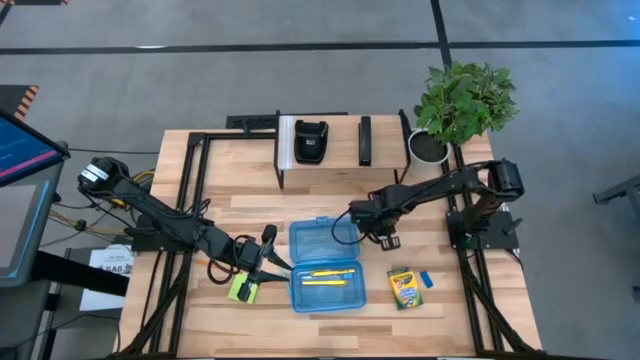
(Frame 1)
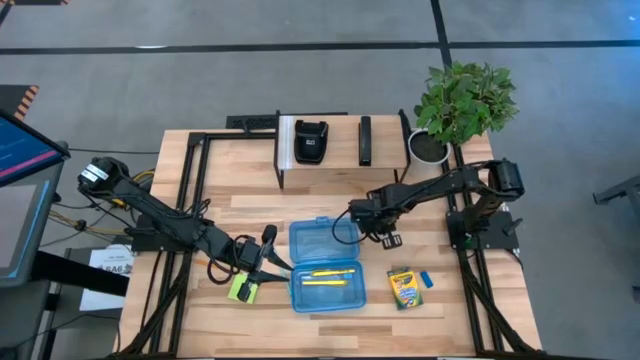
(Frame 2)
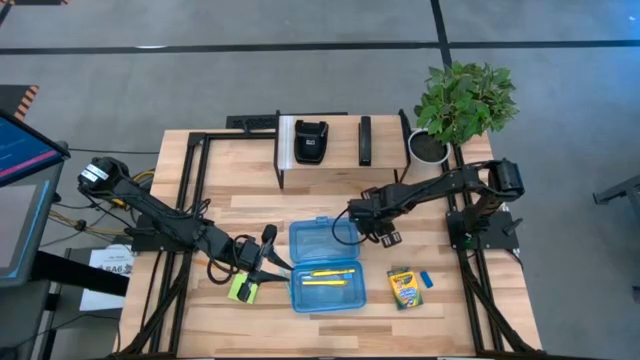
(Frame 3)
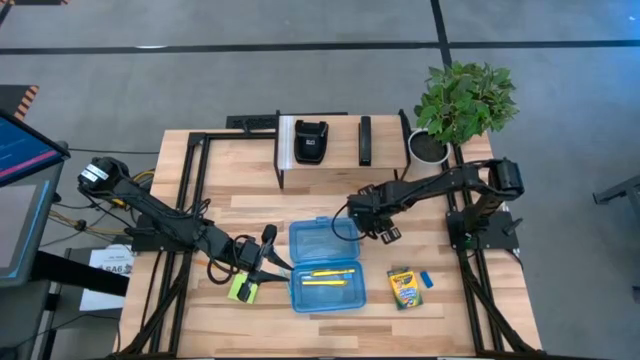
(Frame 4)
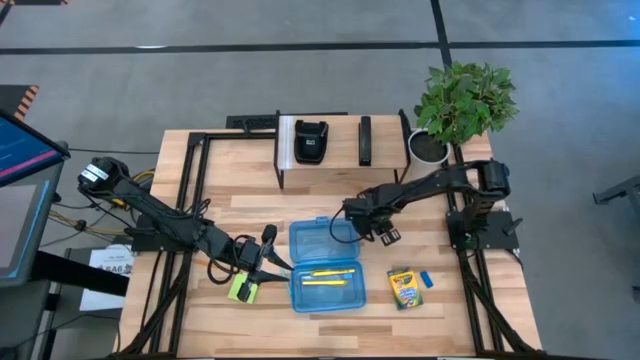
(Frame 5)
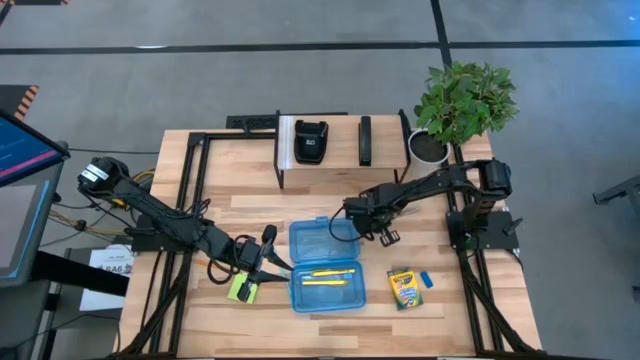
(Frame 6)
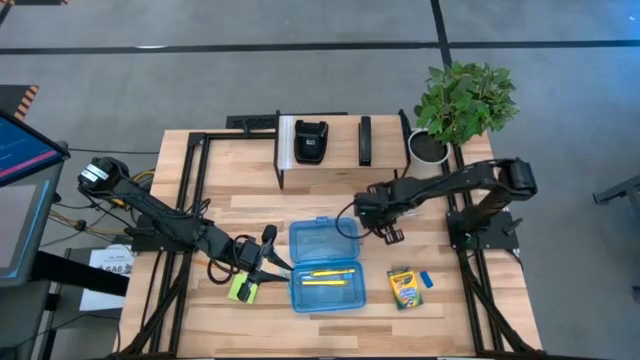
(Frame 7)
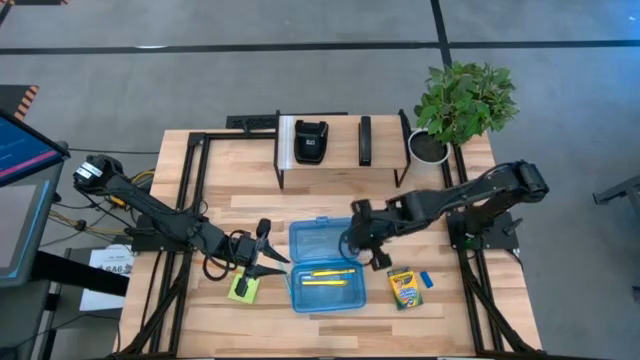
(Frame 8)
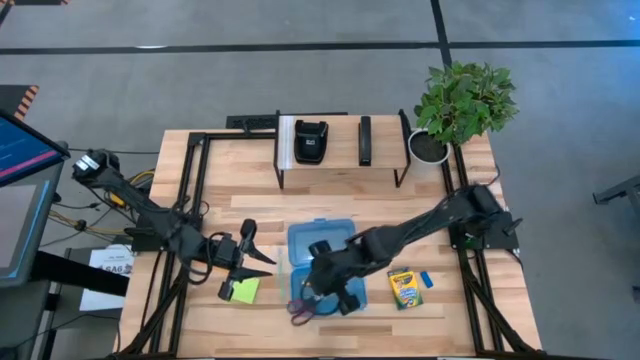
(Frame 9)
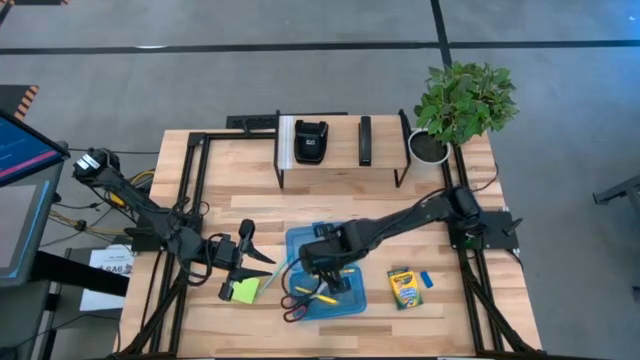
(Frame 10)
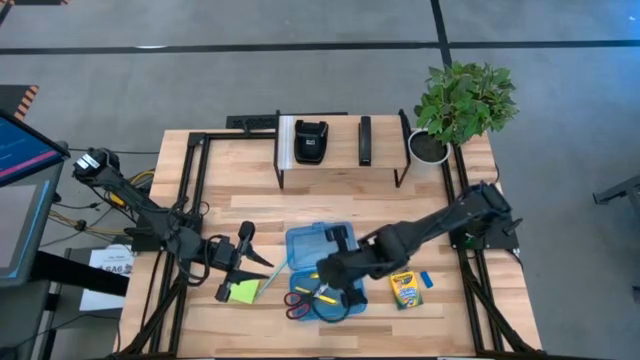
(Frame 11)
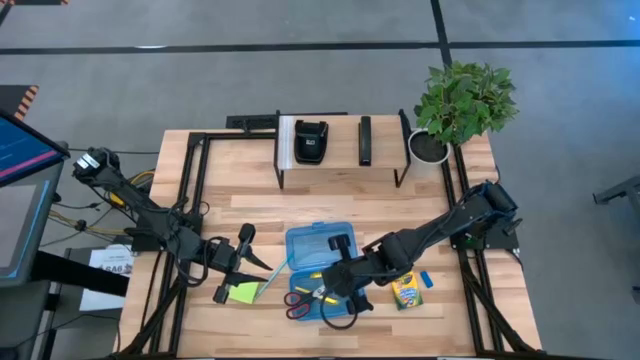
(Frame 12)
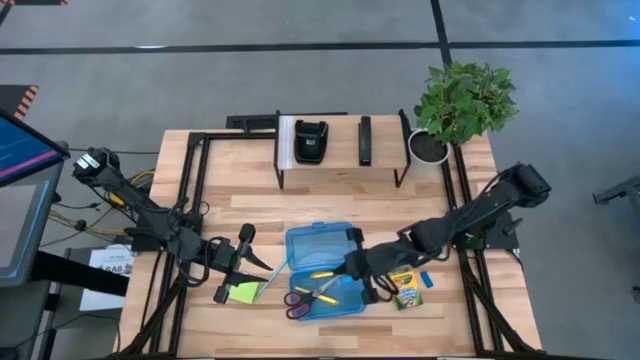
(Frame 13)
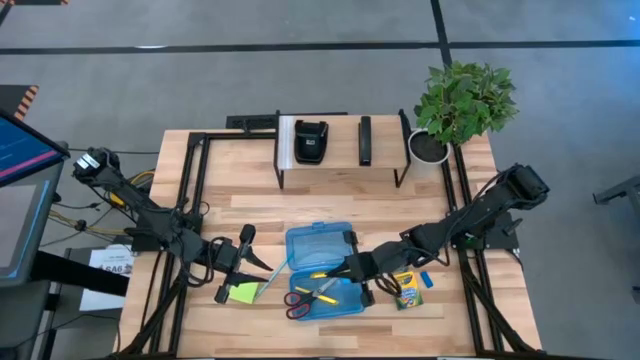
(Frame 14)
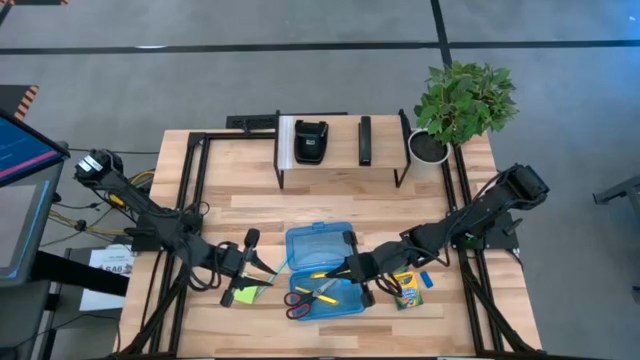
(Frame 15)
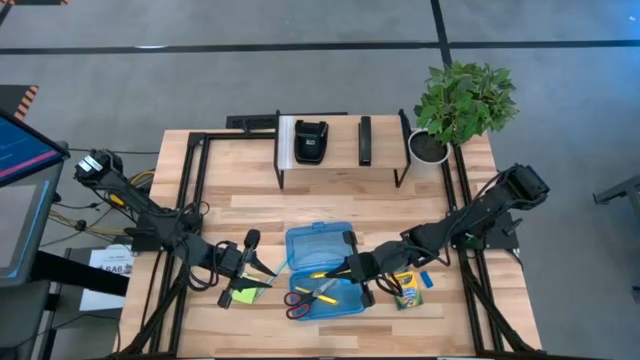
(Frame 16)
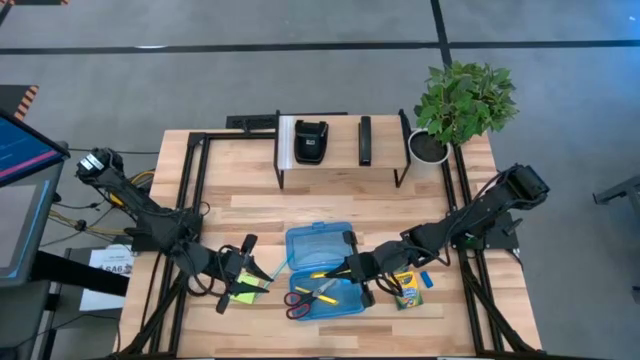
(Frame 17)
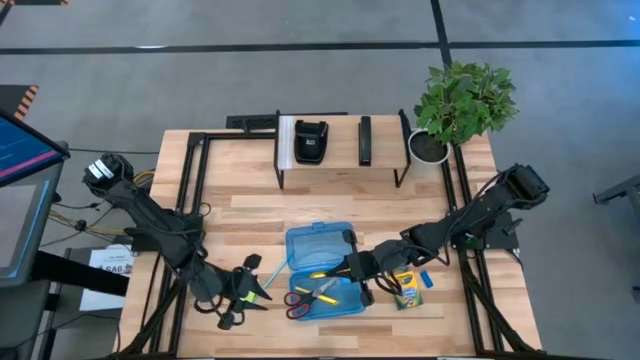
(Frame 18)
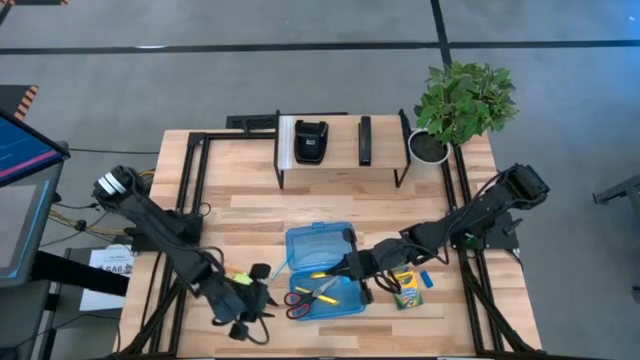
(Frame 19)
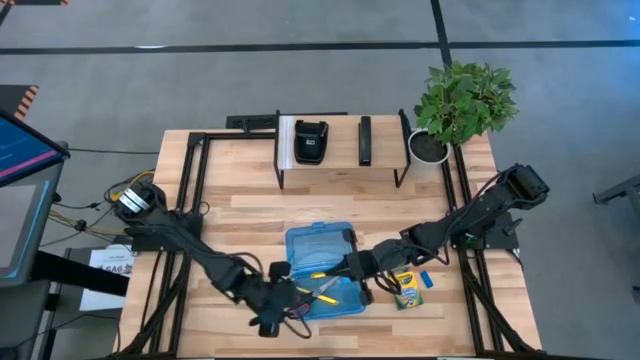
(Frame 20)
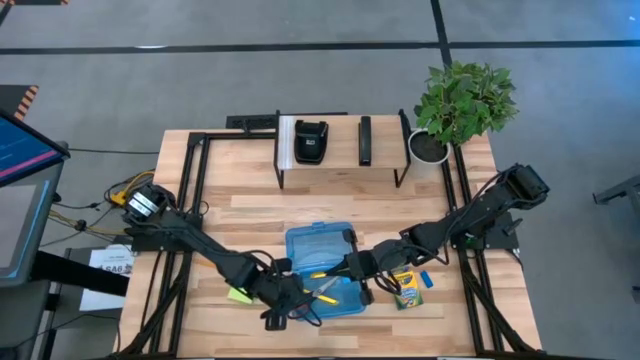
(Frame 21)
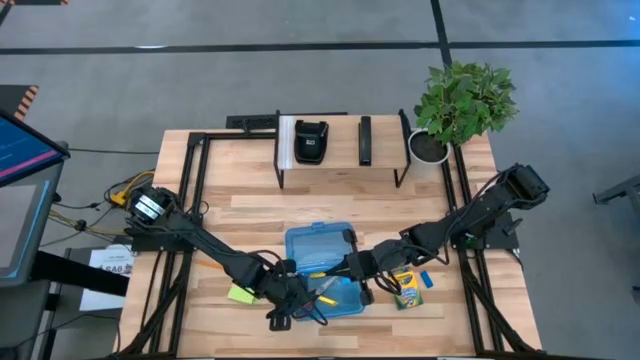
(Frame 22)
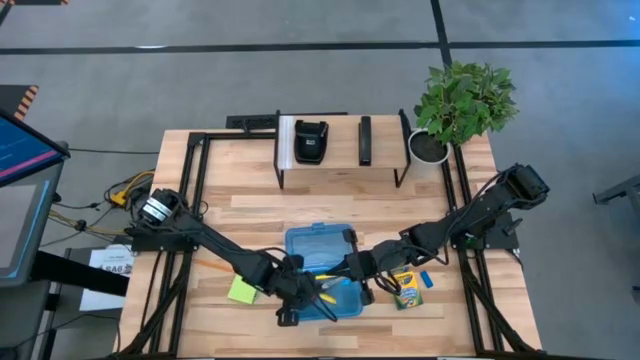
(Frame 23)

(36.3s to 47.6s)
Task: Pack school essentials
Put the black scissors into the blue supply box

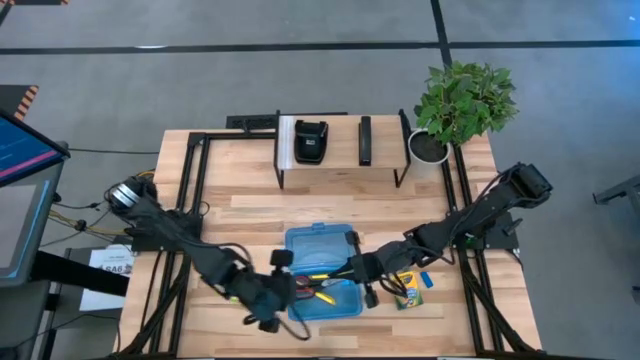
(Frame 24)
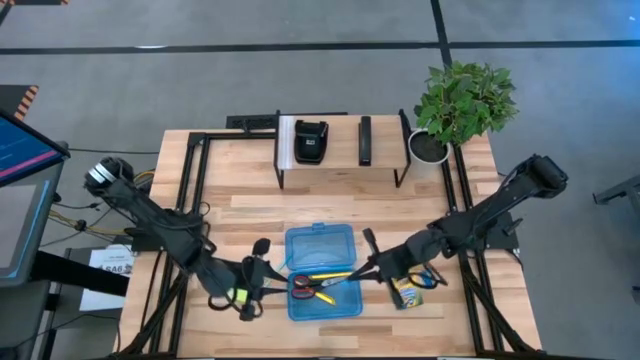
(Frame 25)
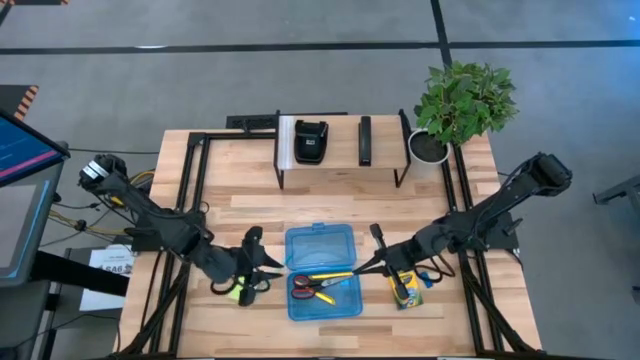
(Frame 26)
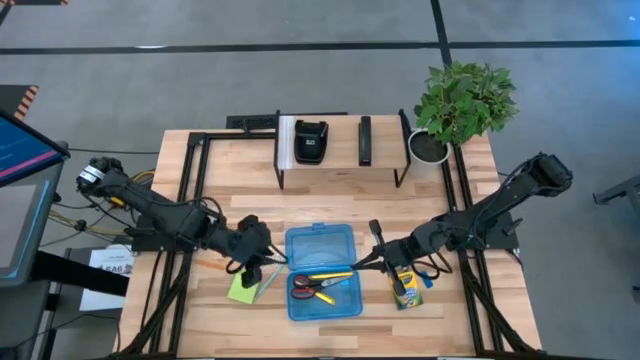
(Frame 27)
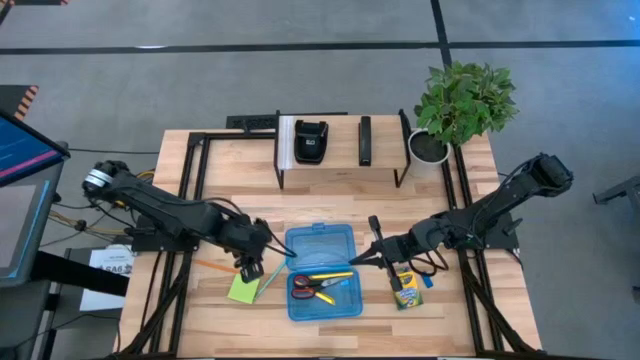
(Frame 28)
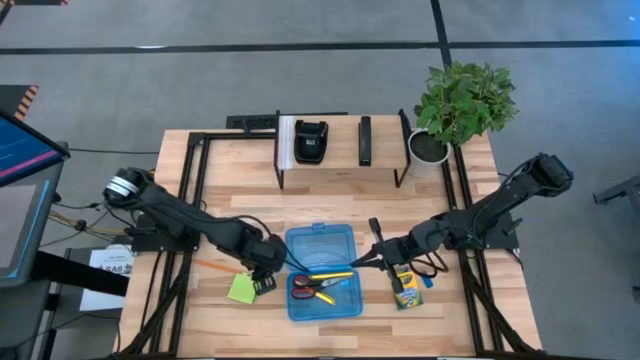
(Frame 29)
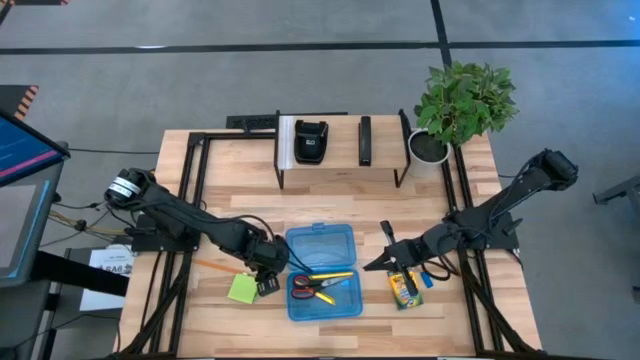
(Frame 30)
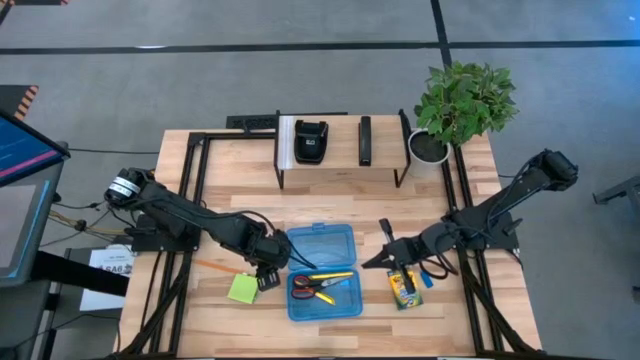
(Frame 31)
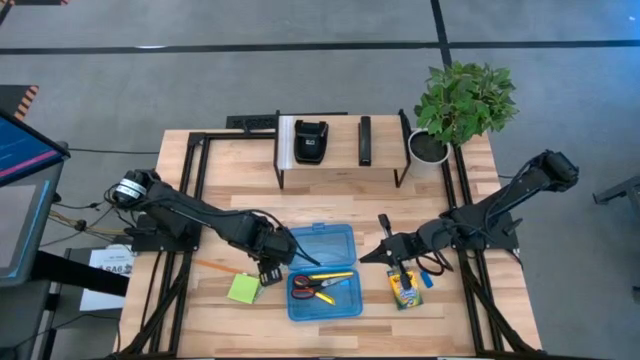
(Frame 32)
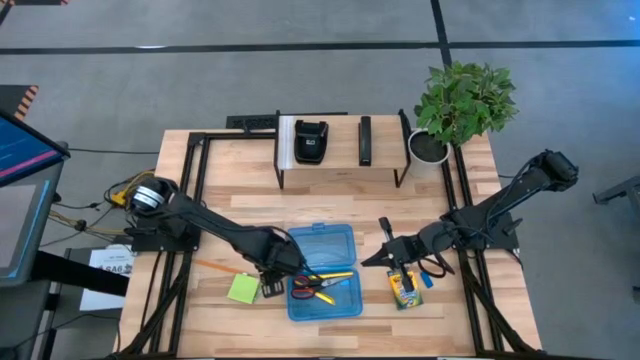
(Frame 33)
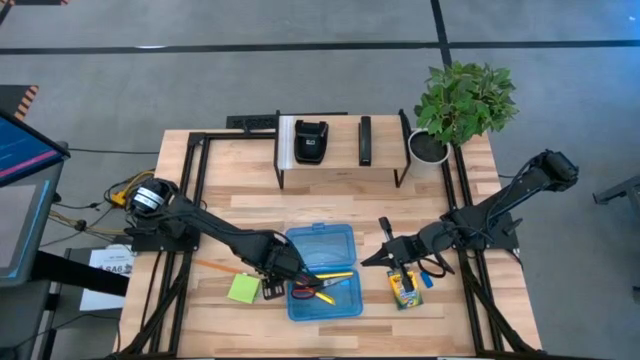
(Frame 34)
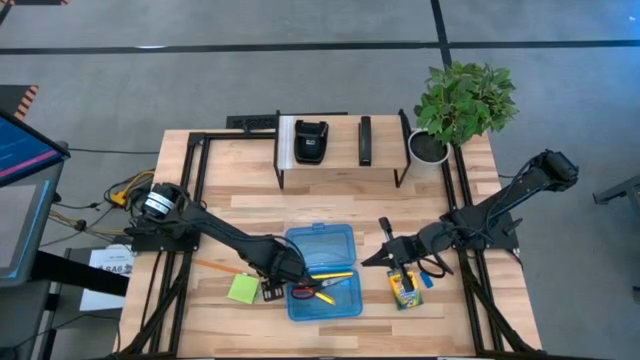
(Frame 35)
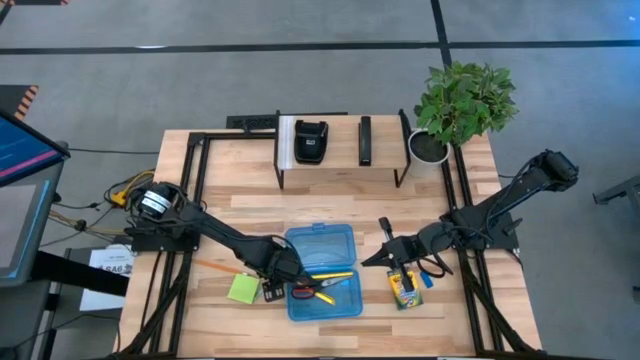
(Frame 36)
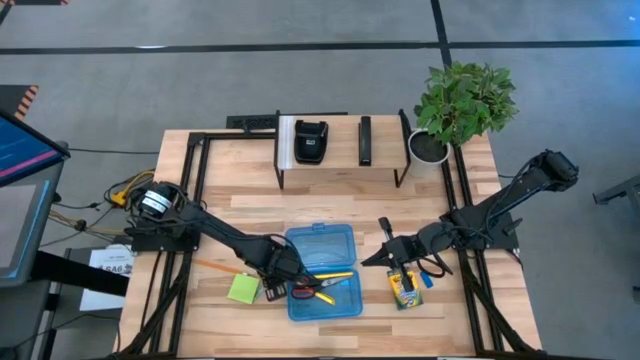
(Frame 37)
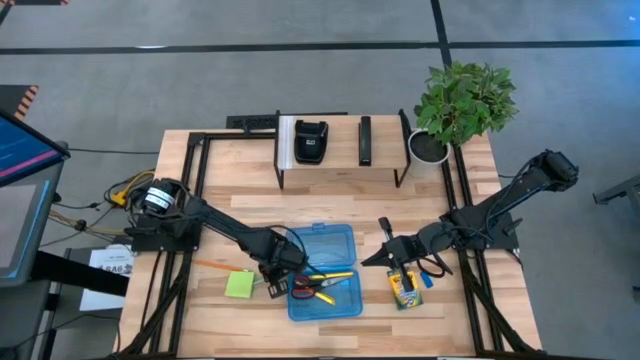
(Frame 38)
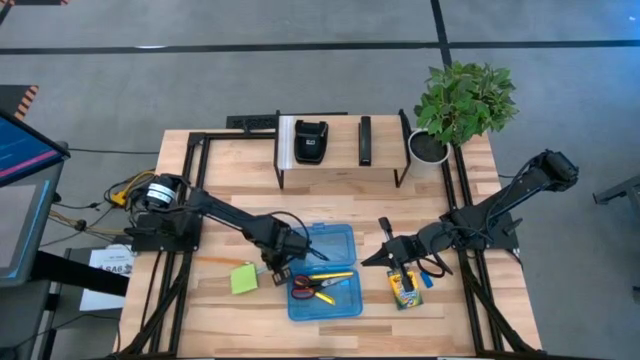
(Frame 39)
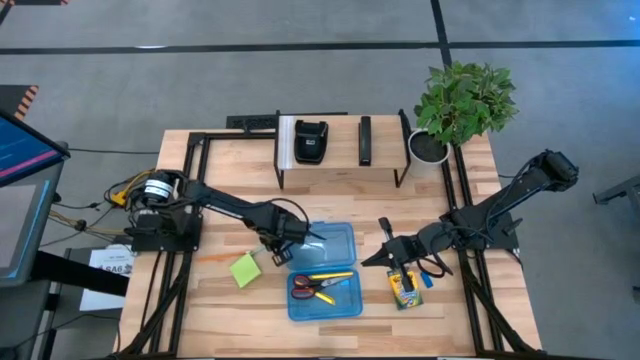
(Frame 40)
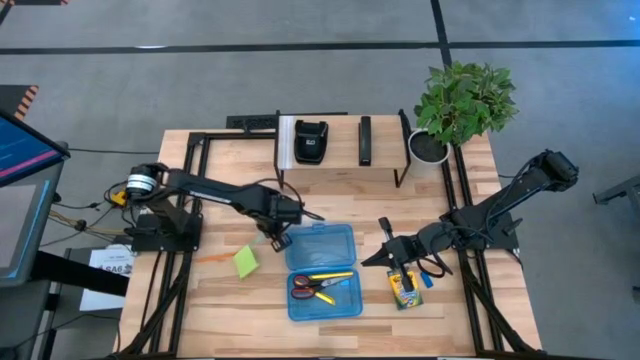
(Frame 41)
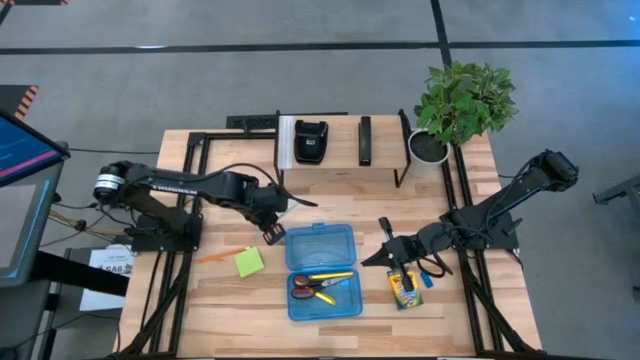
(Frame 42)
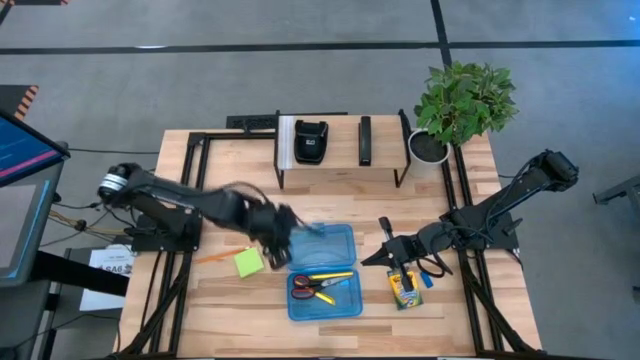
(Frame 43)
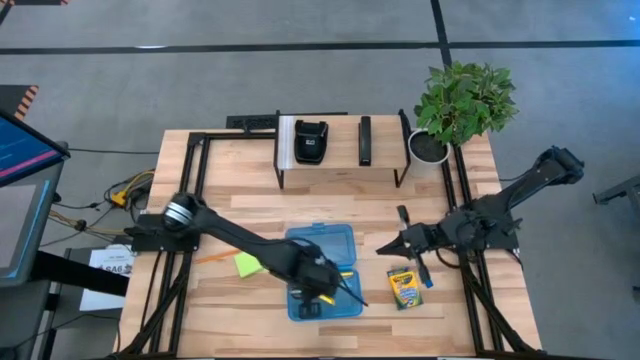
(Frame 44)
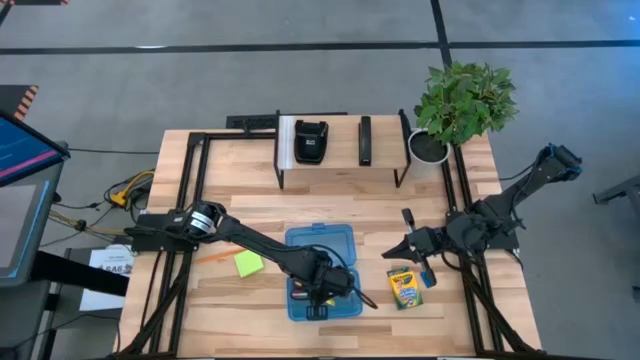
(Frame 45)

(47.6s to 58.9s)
Put the light blue pencil into the blue supply box
